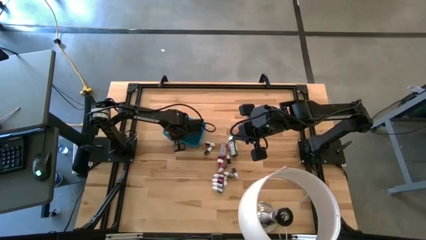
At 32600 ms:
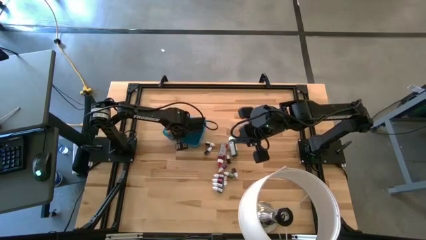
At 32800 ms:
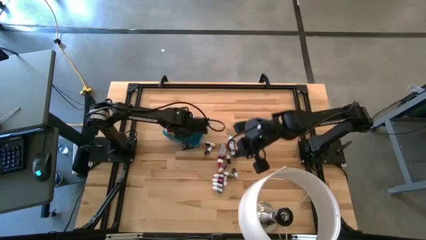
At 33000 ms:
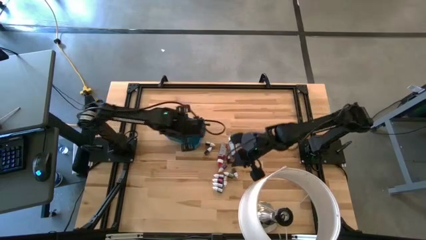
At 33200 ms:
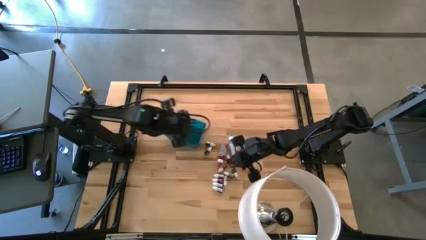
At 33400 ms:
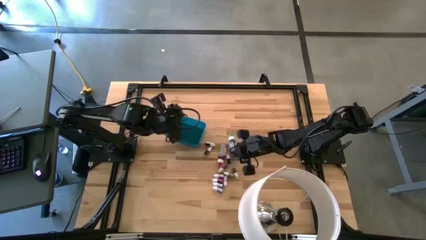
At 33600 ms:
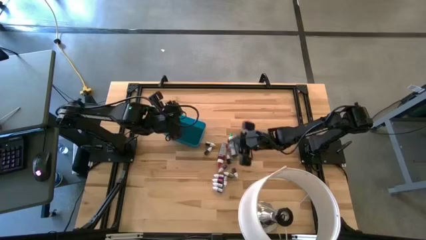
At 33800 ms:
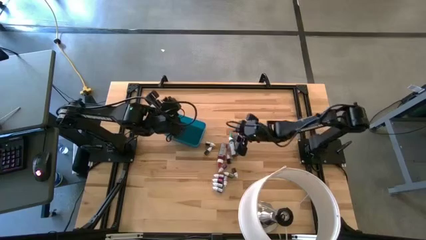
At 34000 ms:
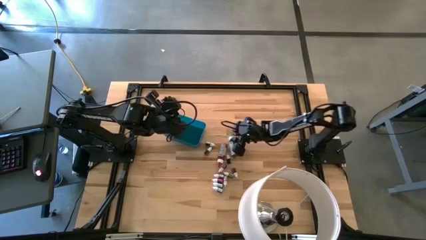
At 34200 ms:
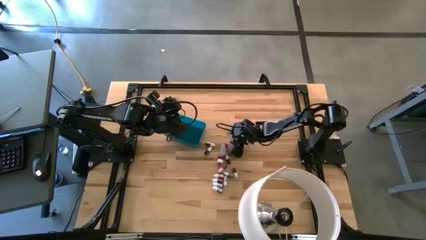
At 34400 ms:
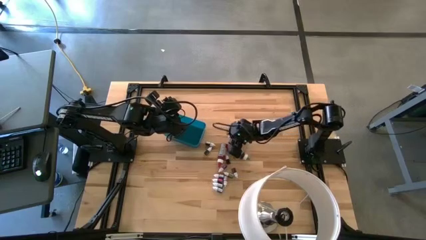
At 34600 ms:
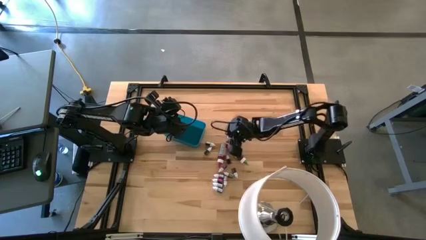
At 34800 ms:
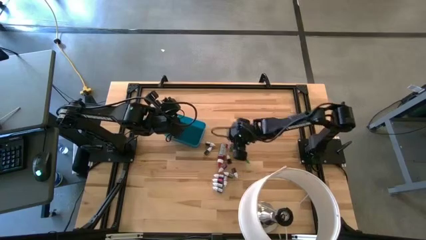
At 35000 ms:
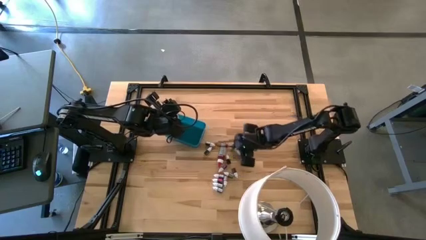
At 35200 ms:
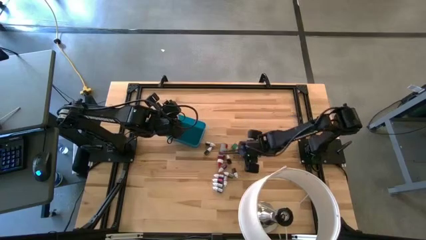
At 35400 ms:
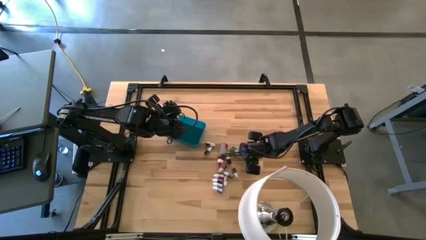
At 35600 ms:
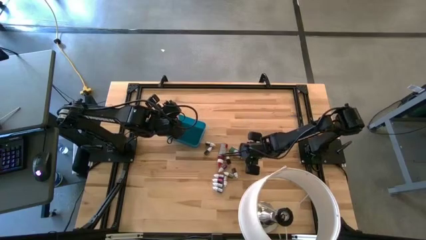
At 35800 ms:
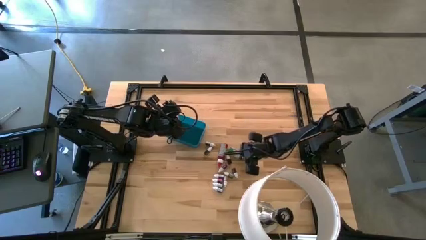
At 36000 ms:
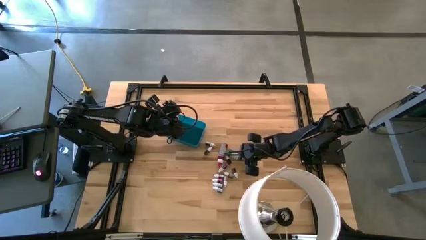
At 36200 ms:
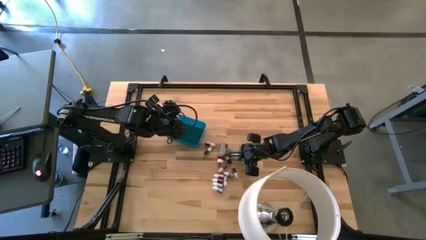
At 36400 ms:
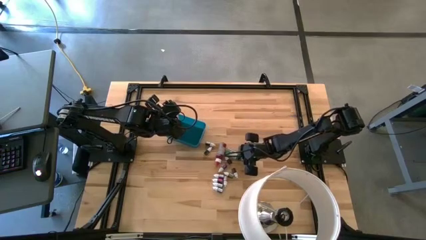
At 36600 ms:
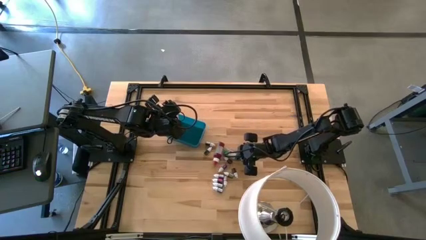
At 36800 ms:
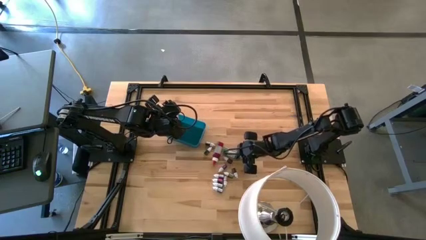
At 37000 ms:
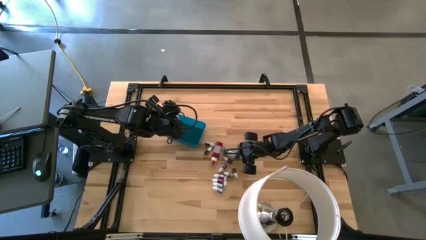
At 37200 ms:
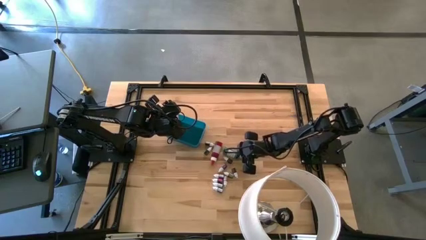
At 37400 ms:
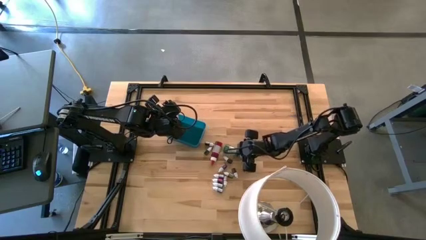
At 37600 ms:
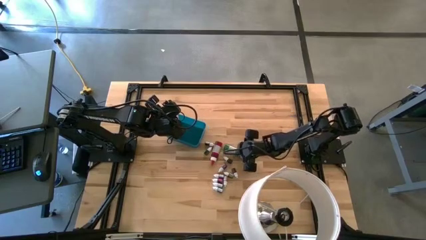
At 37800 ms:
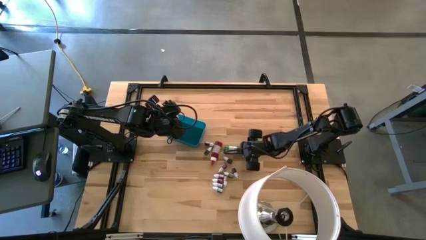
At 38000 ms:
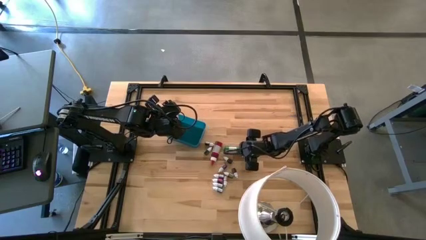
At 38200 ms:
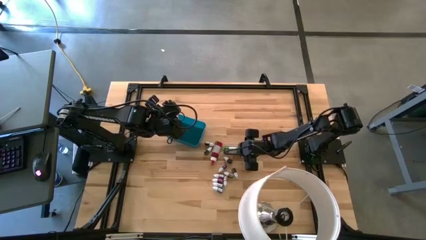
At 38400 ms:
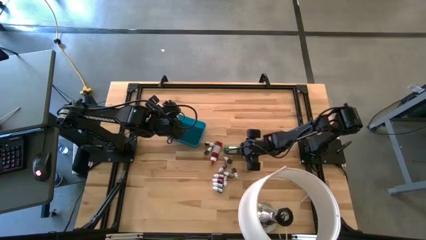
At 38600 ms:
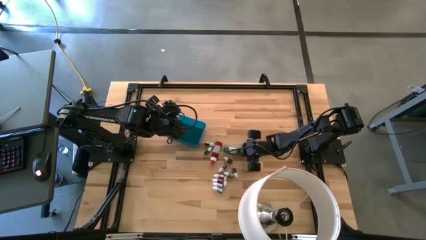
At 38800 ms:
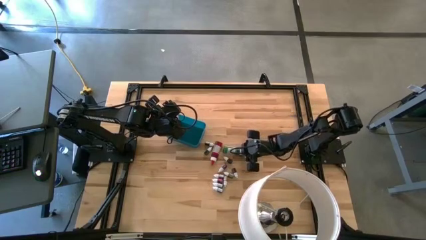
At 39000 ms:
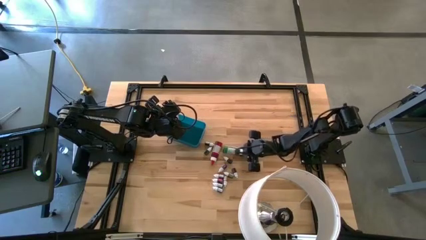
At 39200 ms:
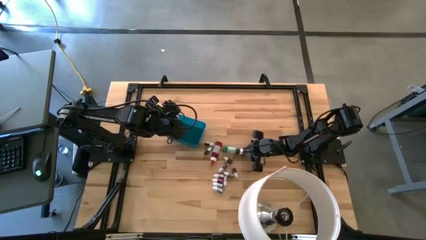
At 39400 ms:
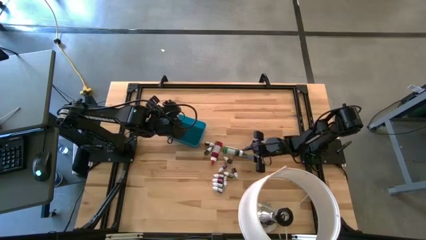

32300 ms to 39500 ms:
Task: Pick & Place food coloring
Put the large green food coloring bottle into the blue bin

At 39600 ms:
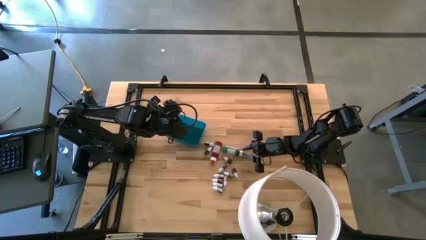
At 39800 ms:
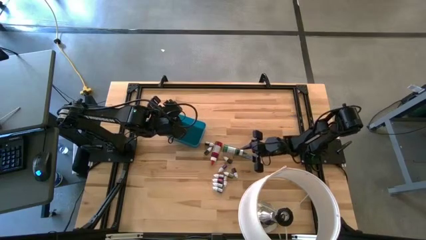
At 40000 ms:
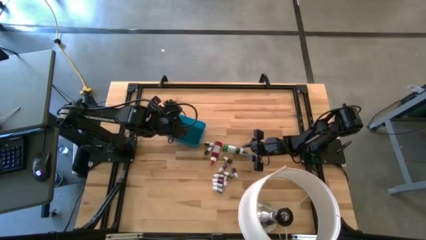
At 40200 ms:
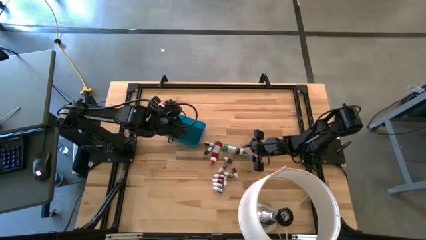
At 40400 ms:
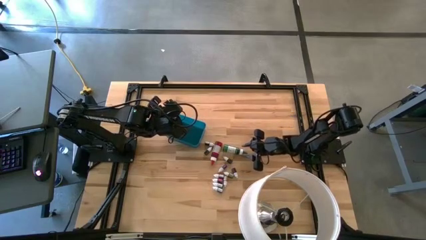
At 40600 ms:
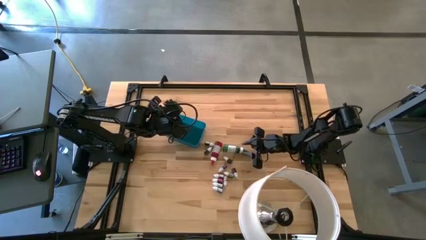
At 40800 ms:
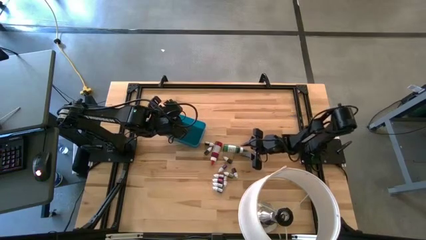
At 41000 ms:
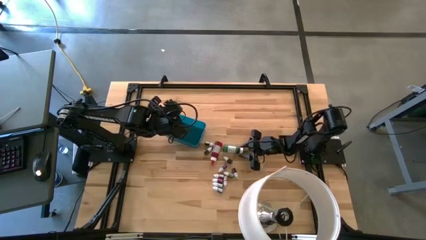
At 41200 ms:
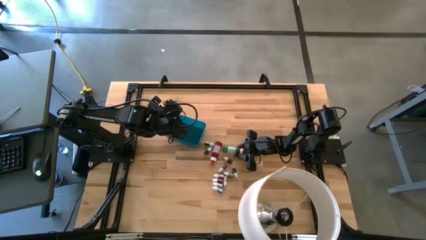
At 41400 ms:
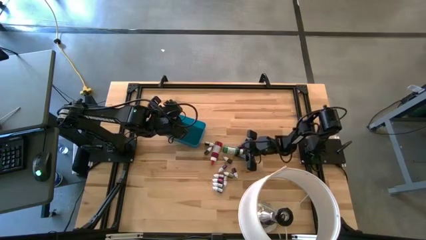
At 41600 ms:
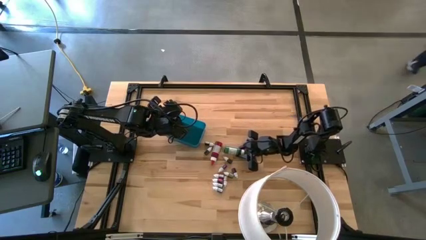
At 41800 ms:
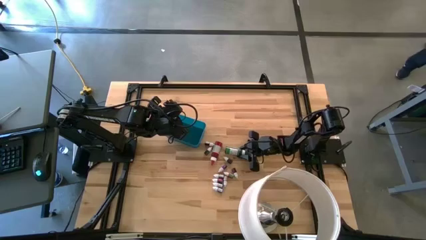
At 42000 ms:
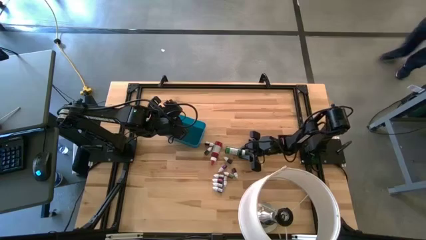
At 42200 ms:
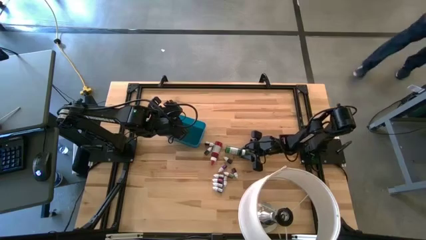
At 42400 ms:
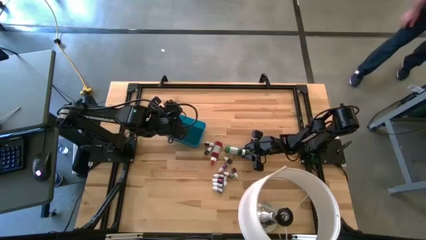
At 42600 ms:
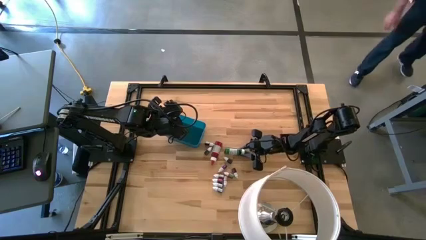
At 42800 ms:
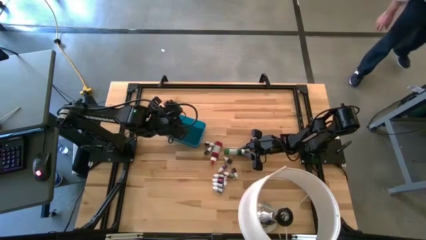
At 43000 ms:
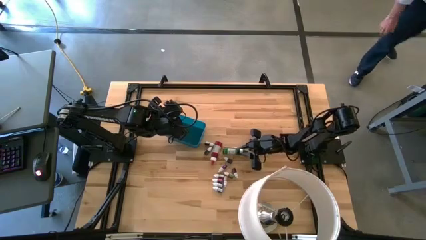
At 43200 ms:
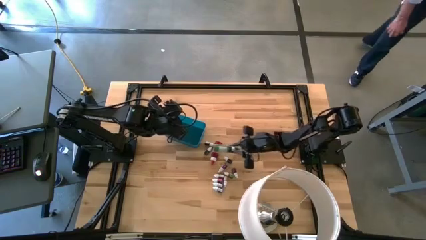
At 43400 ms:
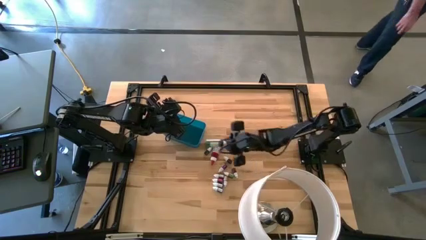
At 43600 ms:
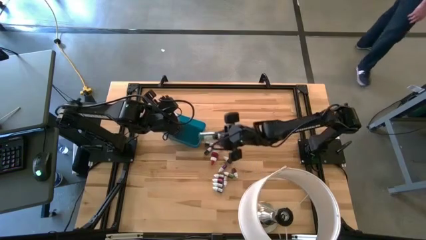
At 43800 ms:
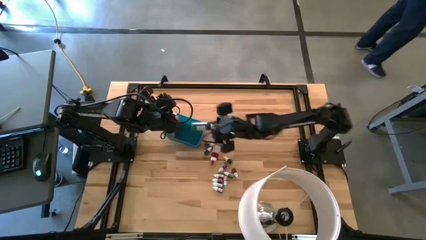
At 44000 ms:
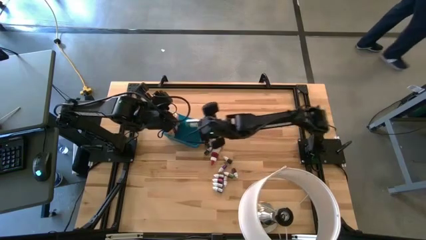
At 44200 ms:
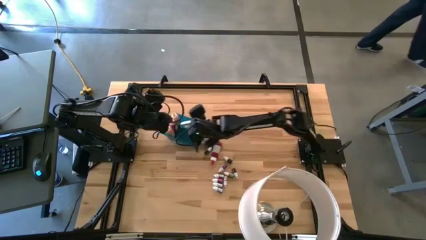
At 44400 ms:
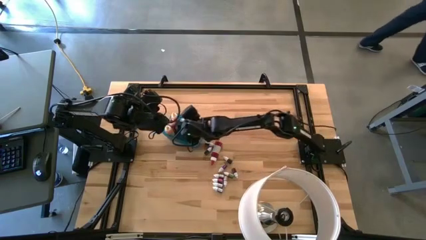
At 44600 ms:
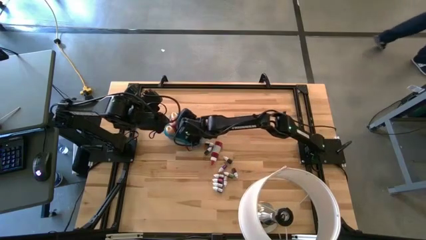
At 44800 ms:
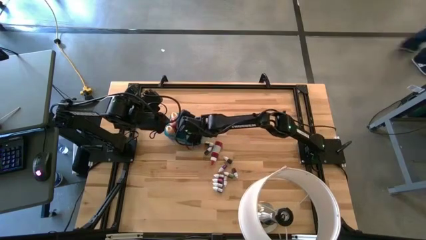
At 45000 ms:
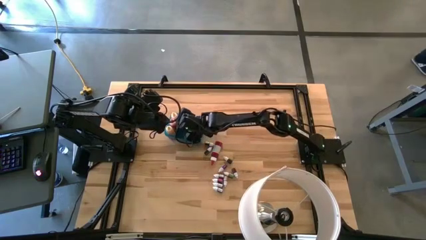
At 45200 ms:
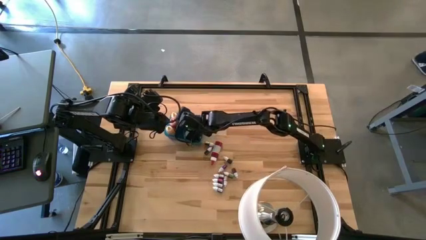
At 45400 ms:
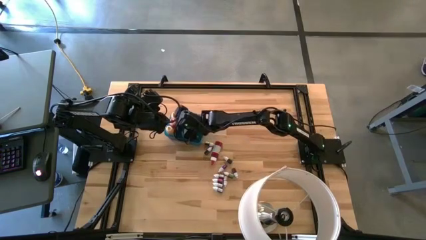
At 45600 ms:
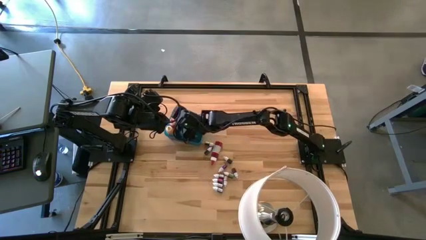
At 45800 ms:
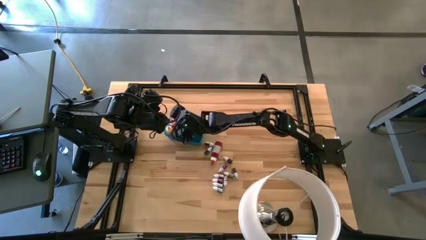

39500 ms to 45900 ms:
Put the large green food coloring bottle into the blue bin

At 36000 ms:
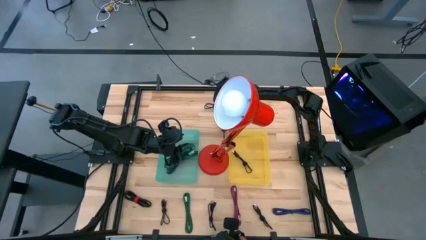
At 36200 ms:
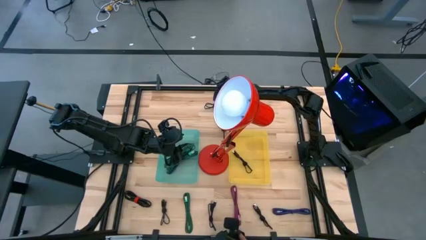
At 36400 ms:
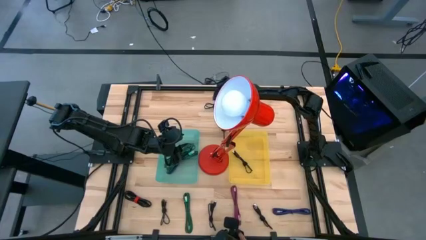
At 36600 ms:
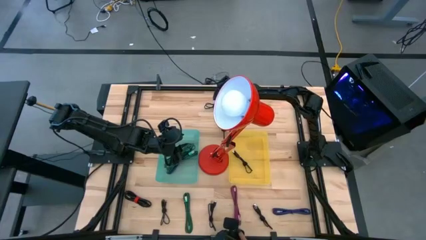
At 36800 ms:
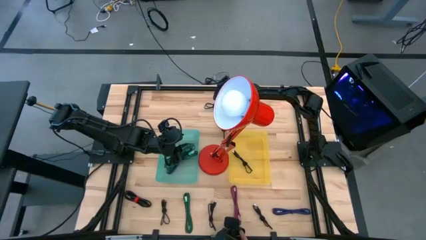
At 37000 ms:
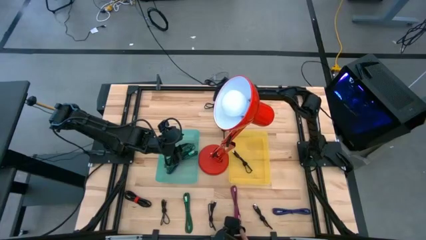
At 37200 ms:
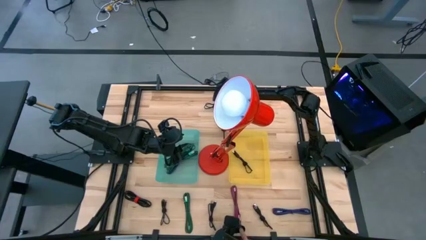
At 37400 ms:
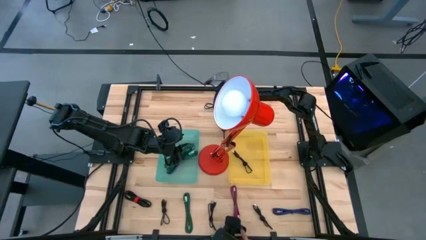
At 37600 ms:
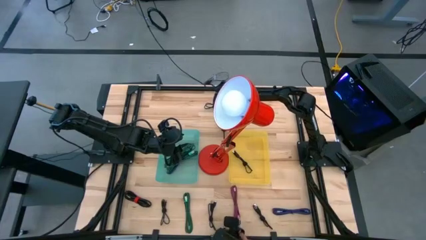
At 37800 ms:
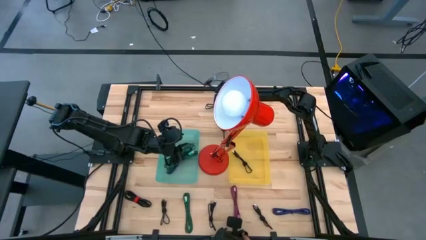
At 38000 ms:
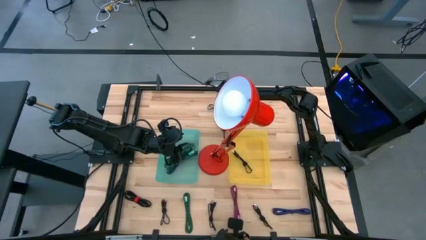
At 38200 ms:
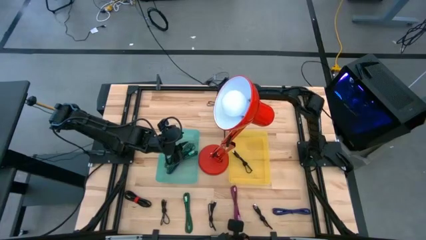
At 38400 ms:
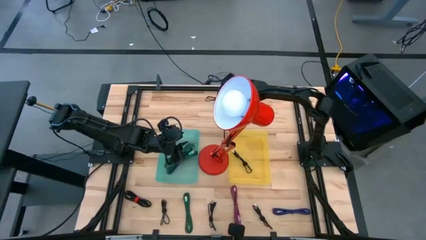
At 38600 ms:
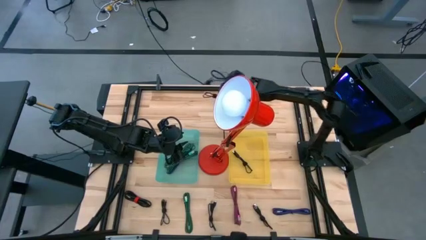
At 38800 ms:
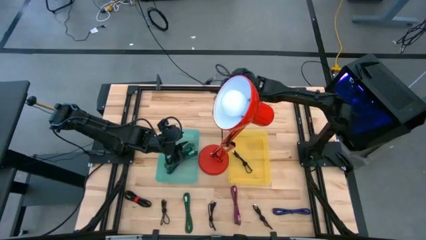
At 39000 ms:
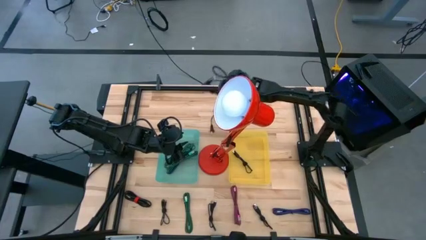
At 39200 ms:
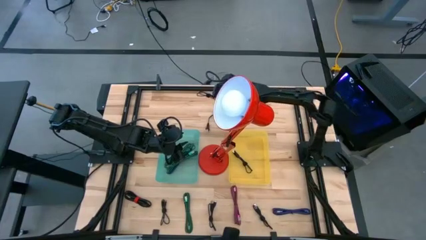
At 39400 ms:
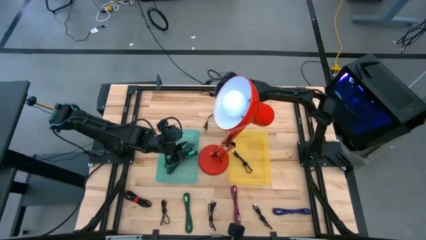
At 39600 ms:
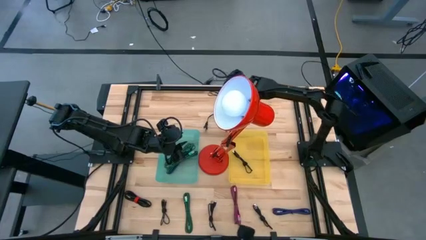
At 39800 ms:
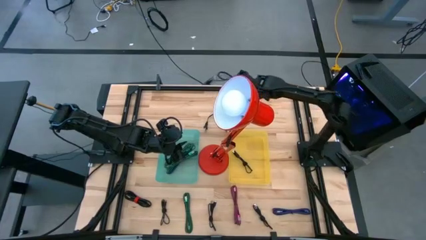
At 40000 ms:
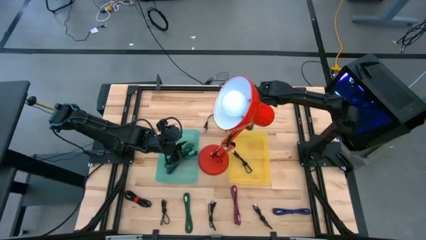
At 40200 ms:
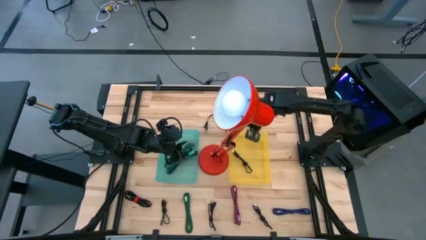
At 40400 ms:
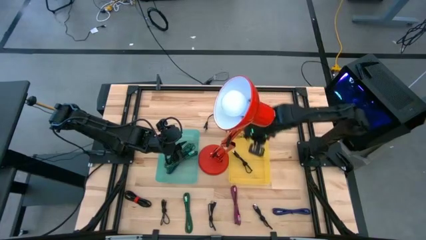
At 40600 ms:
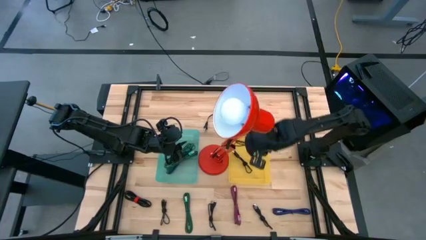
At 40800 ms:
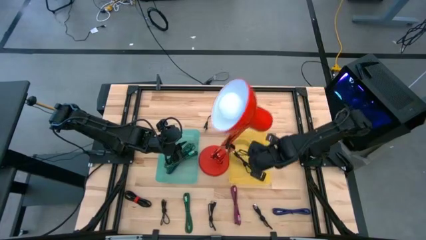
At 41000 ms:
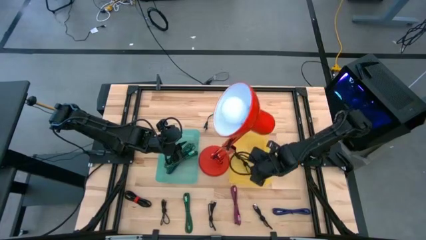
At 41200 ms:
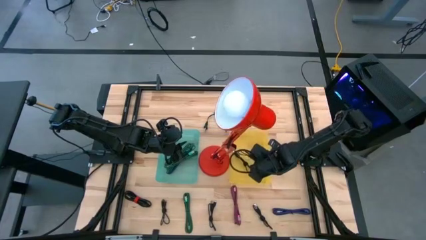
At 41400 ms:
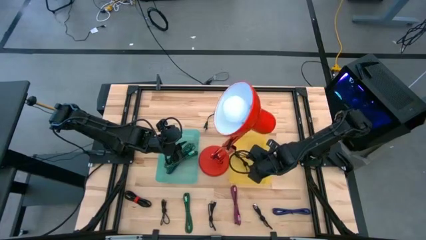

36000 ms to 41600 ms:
Task: Pick & Place USB Port
Put the black charger cable into the yellow bin
